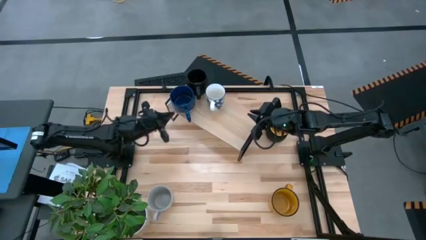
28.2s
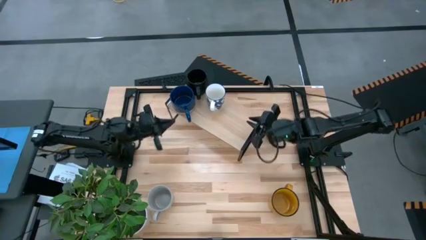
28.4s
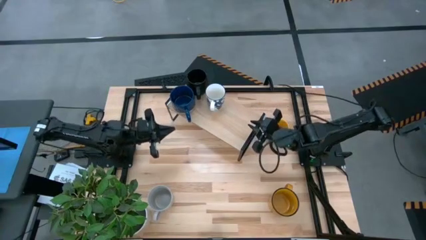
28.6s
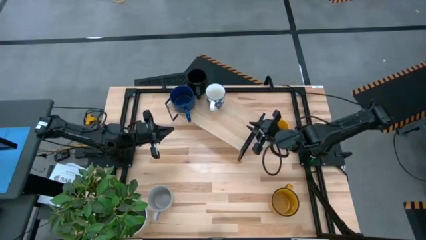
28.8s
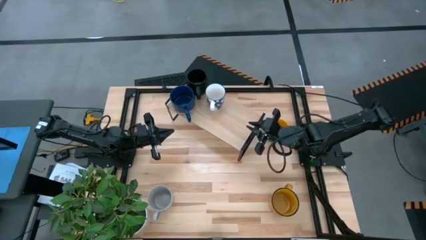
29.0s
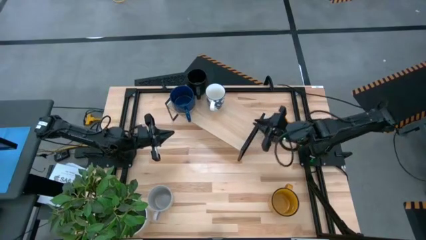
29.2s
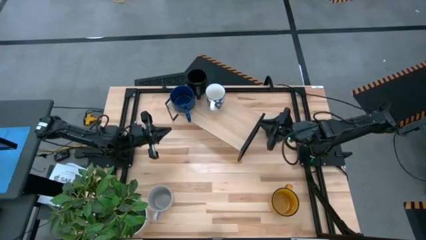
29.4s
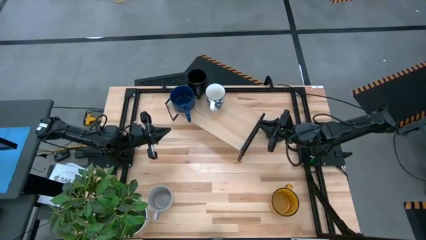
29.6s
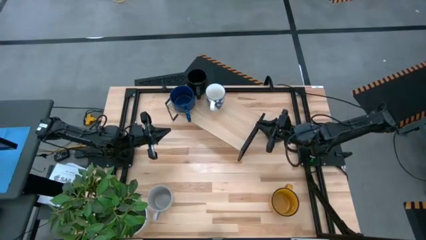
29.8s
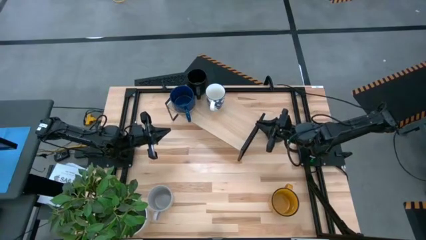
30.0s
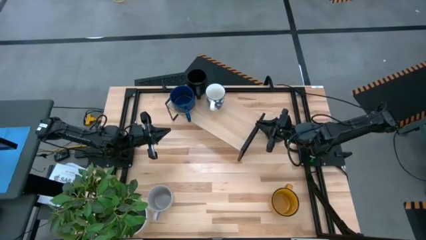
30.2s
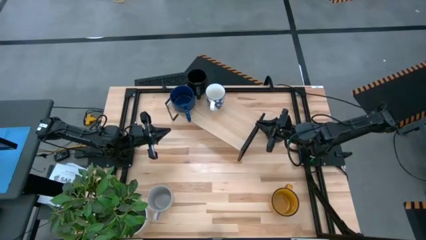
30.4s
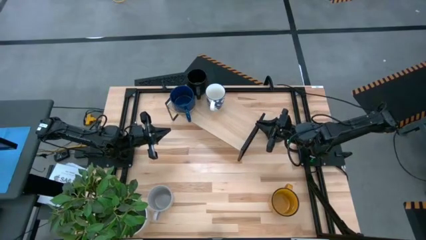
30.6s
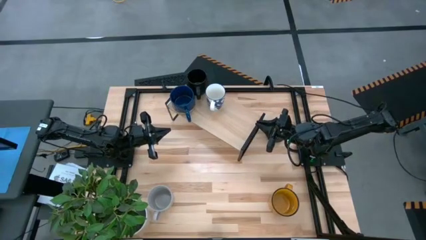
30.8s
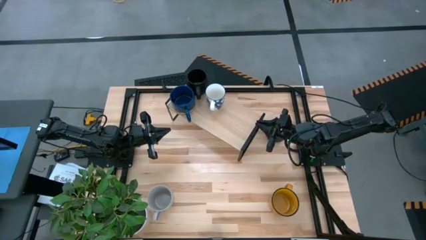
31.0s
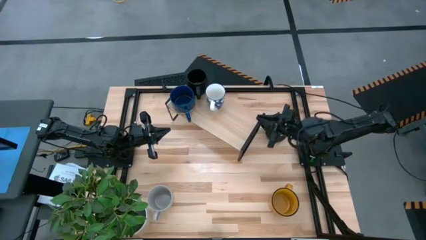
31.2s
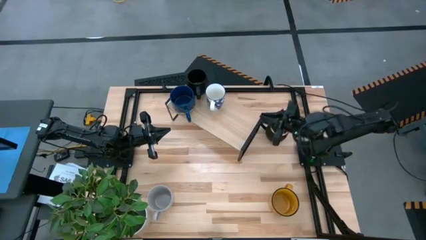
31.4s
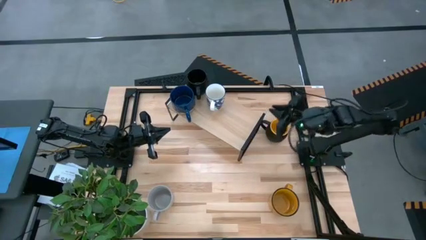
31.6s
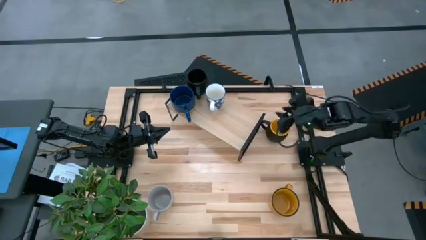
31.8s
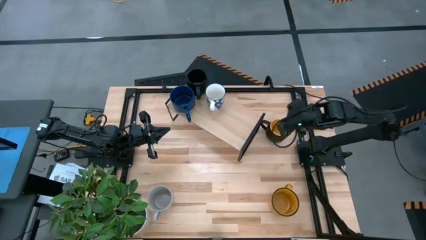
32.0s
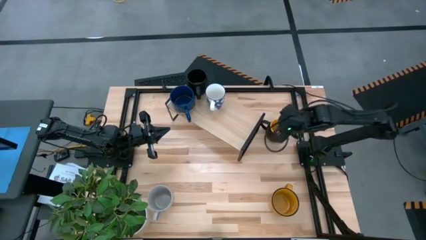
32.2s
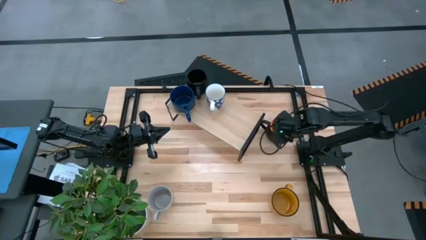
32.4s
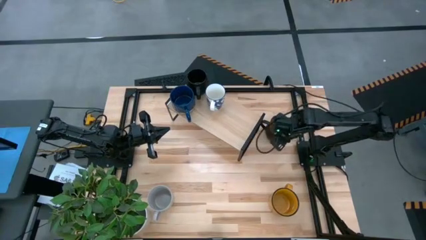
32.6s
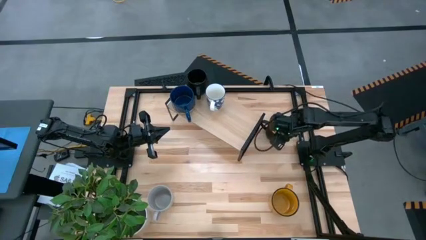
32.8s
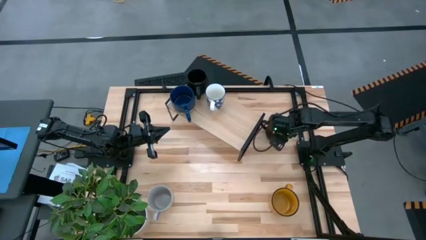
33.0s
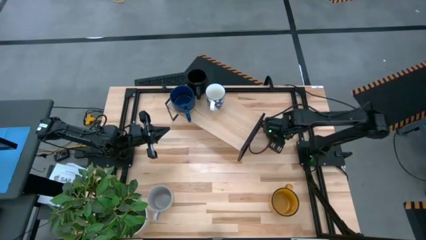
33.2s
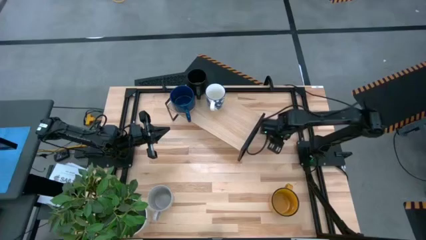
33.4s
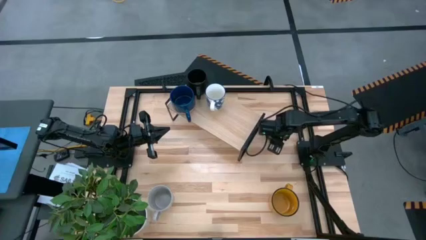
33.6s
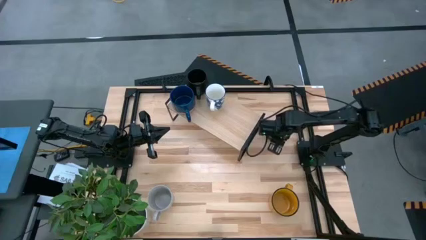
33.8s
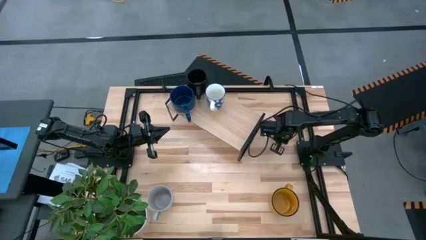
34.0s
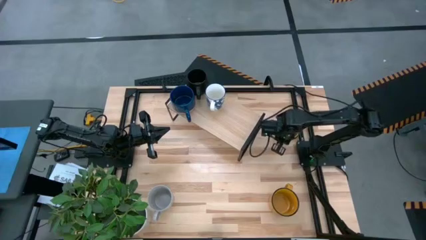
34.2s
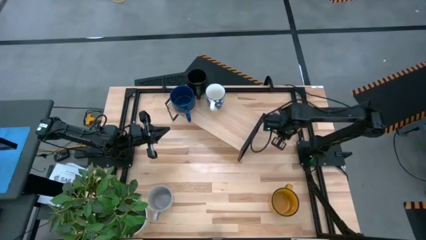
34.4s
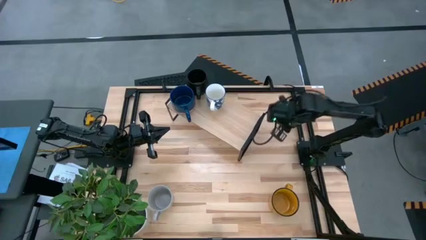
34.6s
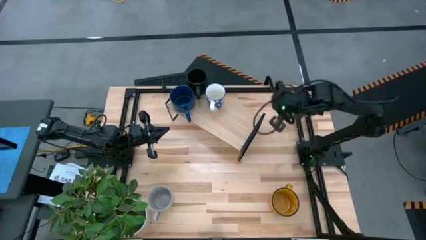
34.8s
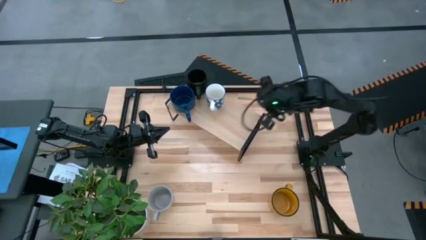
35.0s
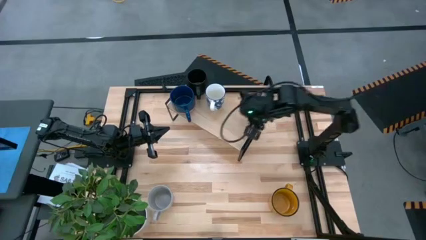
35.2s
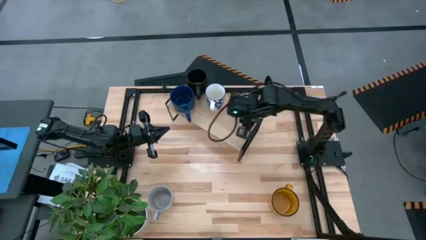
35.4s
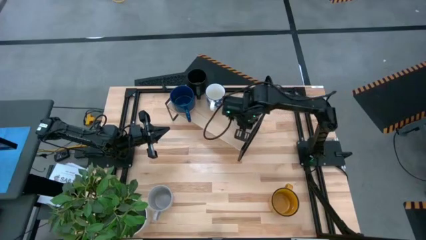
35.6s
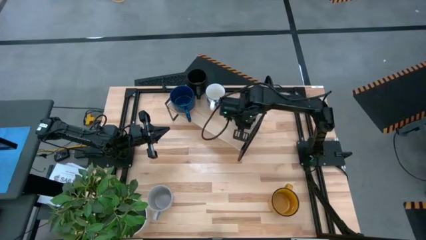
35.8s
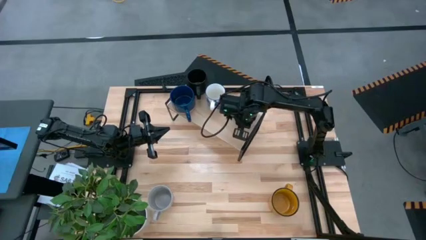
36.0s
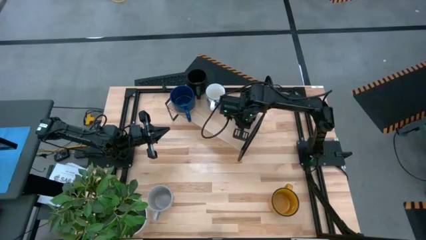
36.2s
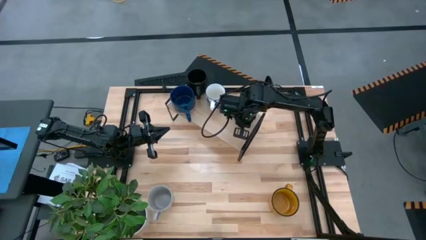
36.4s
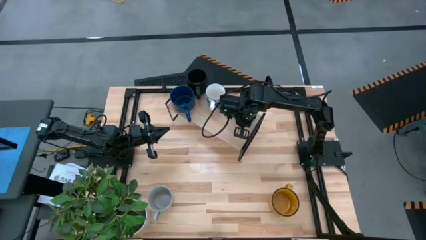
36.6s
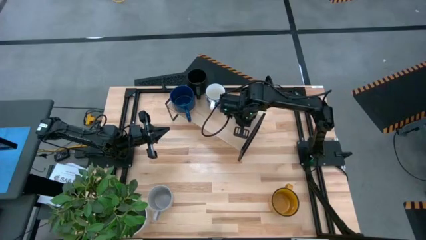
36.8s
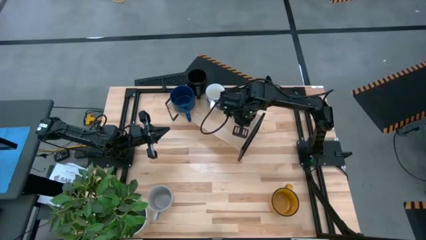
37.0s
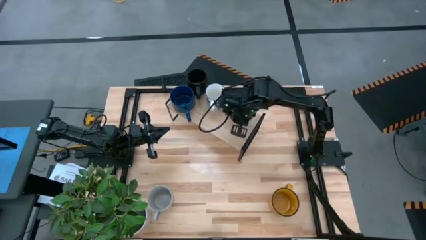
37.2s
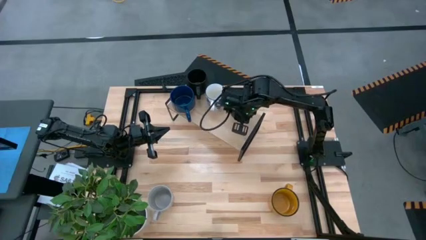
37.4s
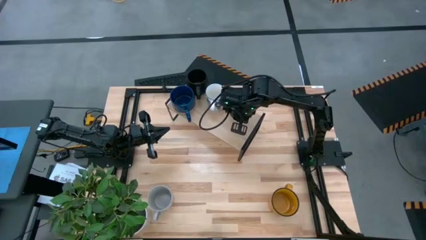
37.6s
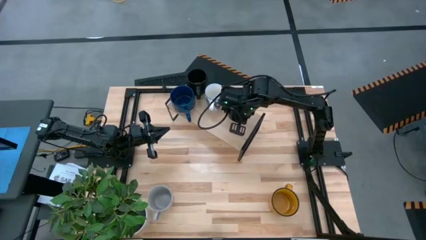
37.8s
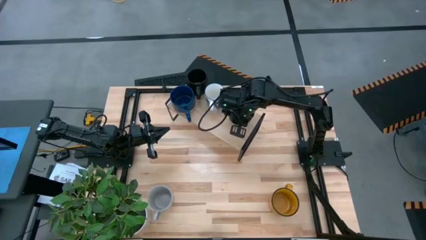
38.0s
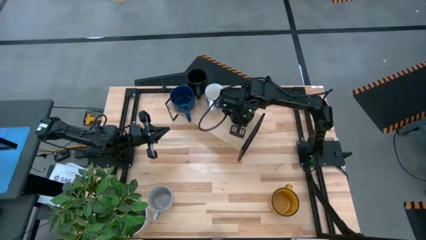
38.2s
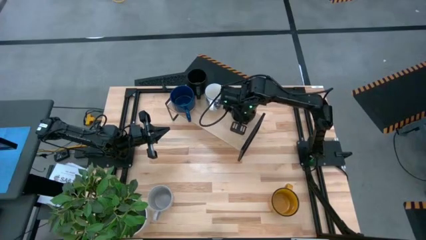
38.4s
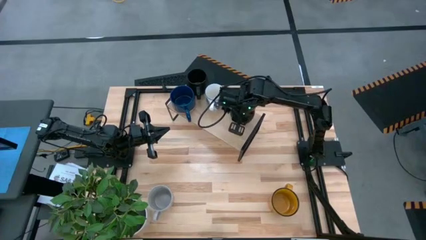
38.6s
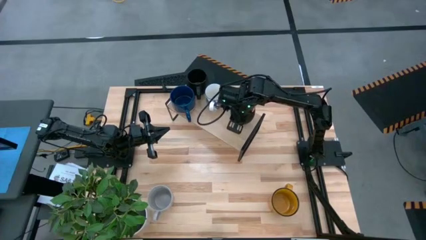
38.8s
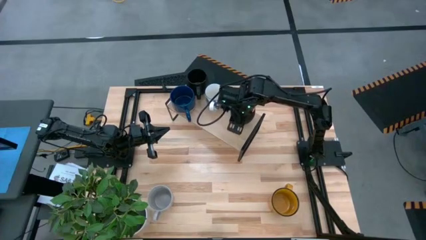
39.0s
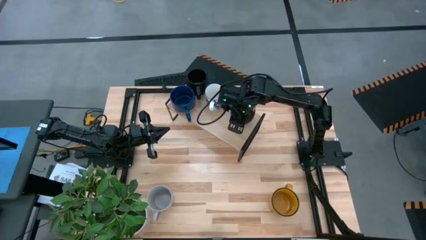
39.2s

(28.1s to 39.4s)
Task: Place coffee mugs
Put the black-yellow mug on the shelf

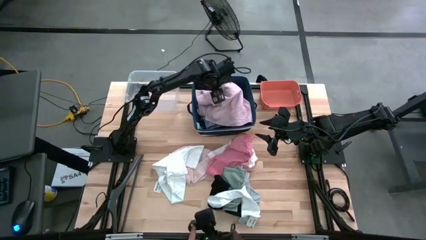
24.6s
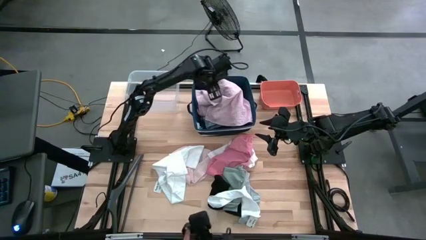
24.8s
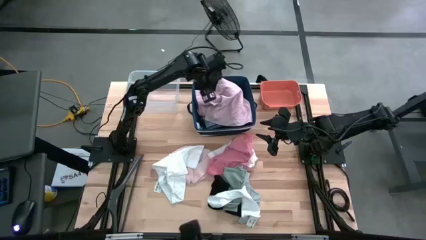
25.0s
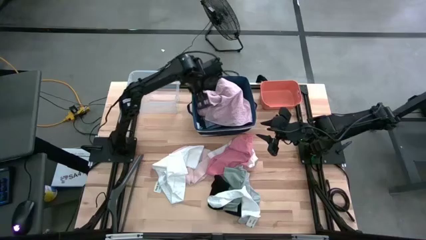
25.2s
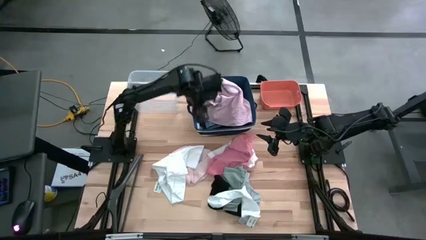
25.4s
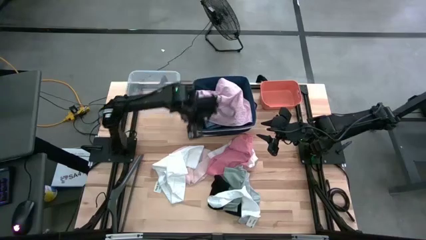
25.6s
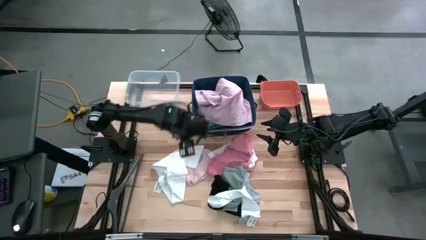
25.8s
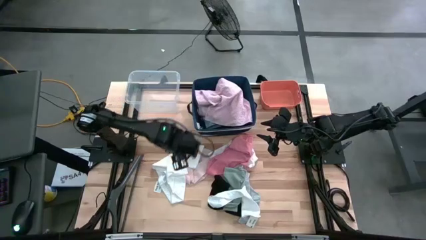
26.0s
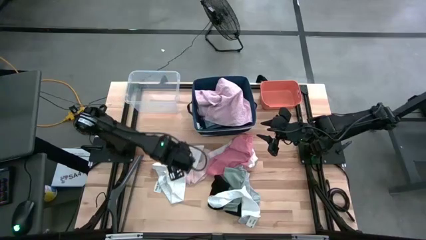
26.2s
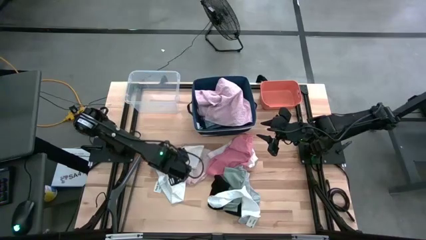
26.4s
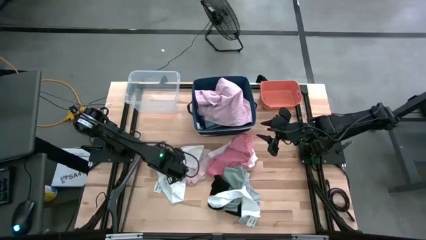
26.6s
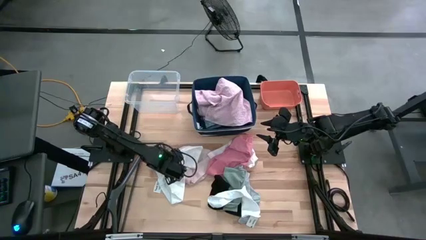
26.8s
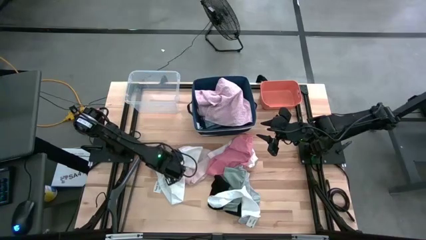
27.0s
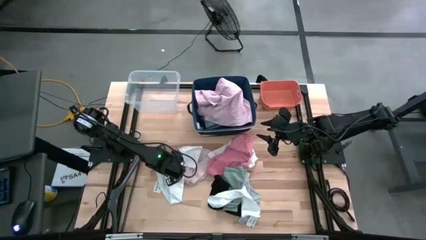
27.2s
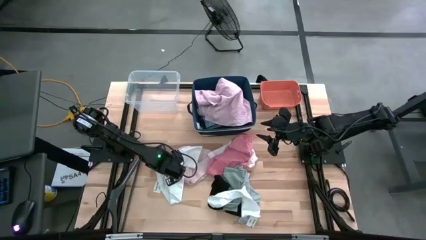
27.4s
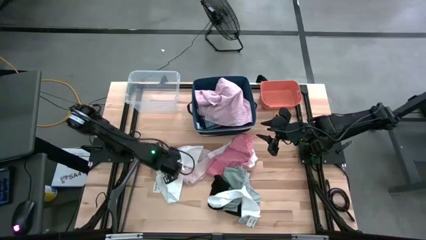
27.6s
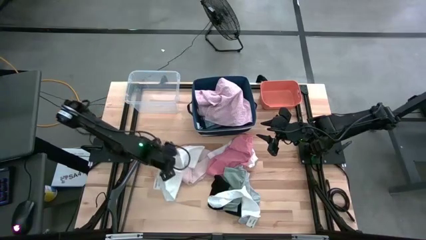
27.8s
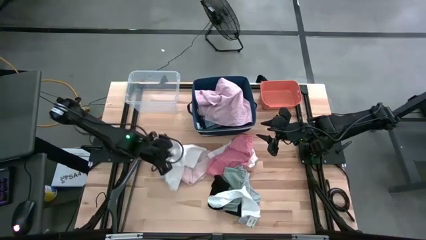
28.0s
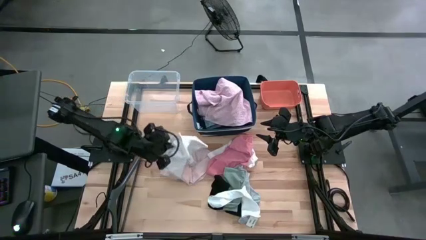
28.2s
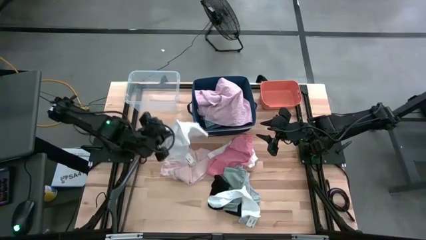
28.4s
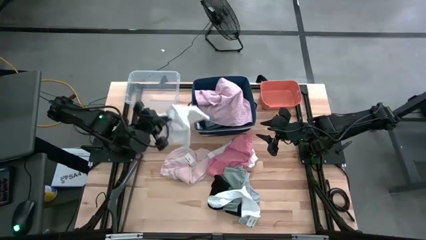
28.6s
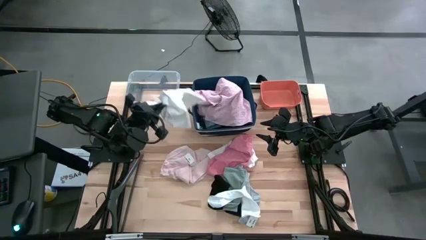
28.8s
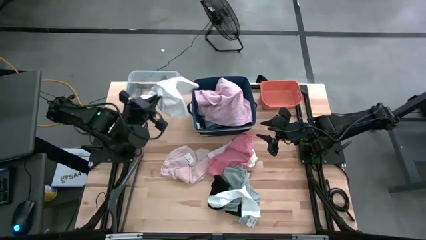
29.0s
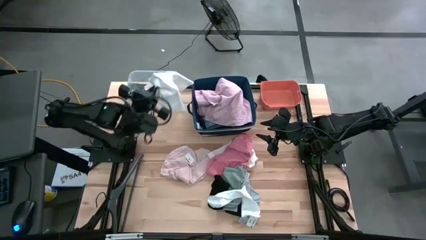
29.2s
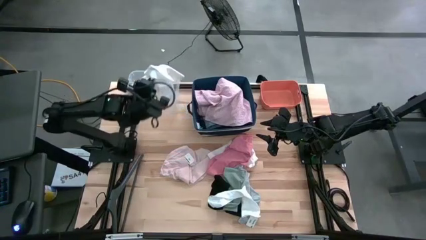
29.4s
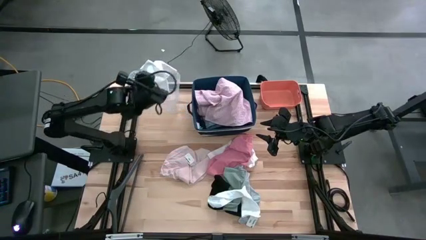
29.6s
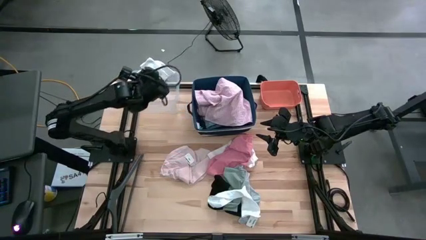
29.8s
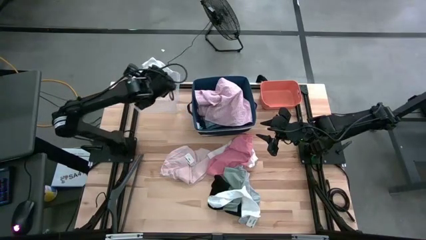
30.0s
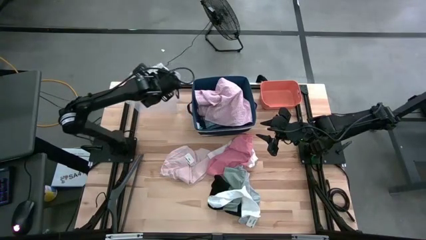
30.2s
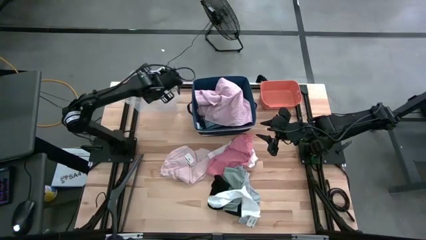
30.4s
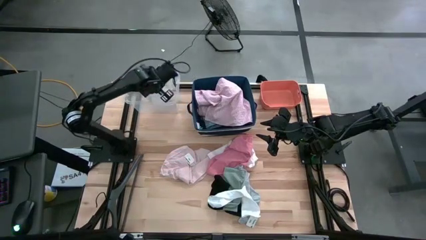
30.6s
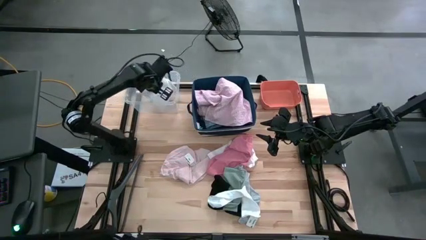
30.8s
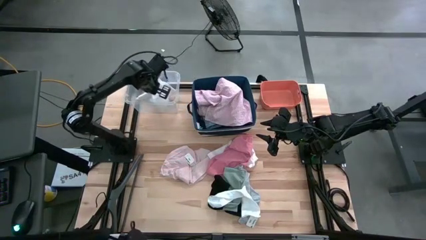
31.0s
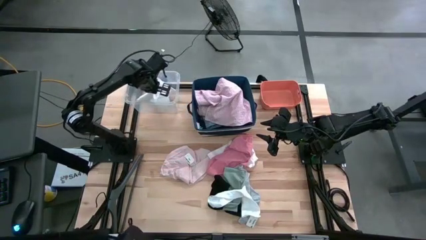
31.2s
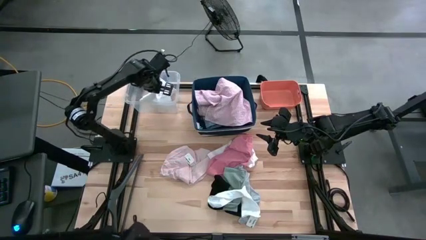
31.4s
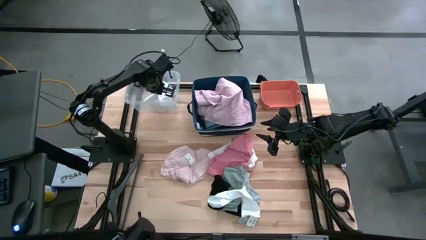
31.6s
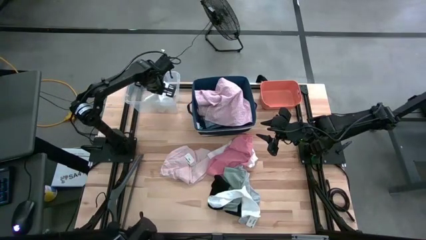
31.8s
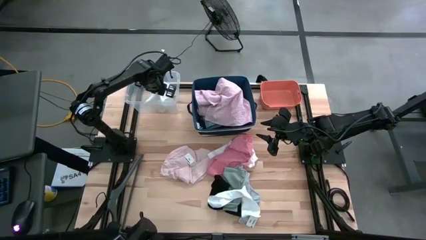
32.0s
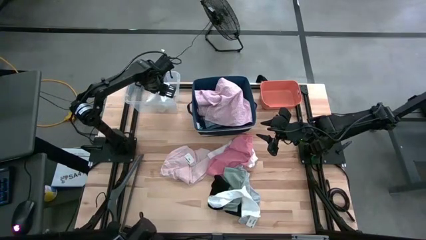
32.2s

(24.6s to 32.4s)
Task: Pick & Place Cloths
Put the white underwear into the transparent bin
